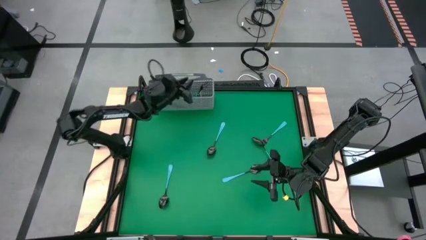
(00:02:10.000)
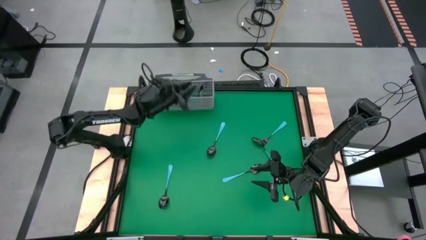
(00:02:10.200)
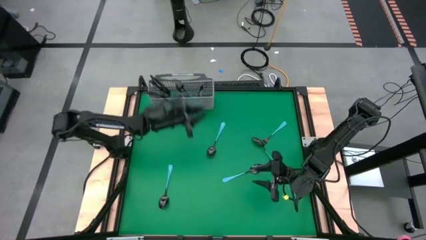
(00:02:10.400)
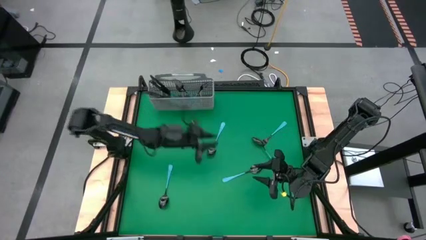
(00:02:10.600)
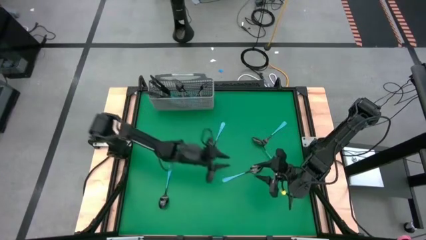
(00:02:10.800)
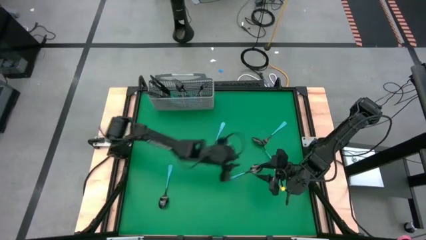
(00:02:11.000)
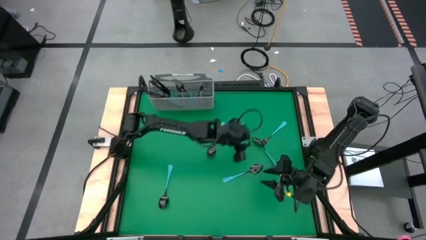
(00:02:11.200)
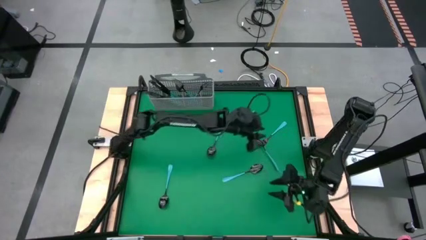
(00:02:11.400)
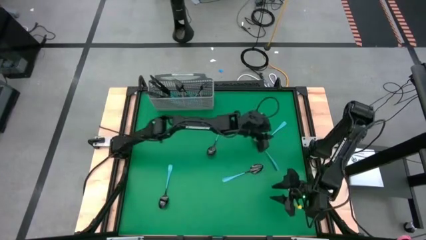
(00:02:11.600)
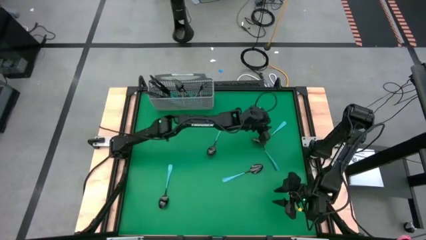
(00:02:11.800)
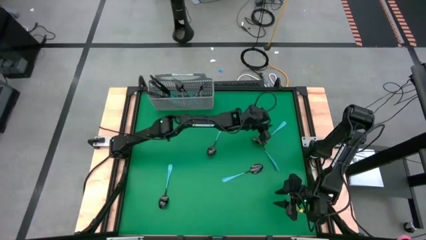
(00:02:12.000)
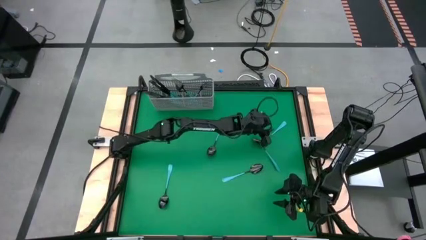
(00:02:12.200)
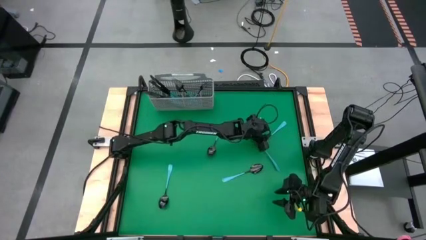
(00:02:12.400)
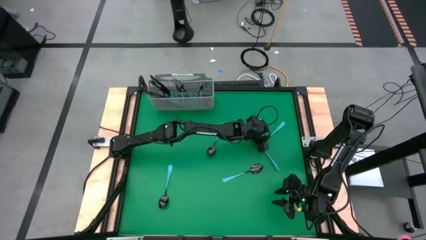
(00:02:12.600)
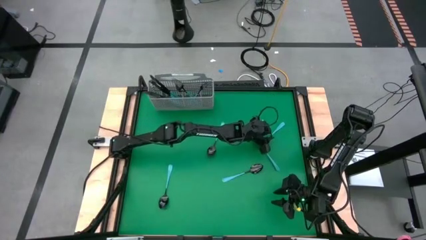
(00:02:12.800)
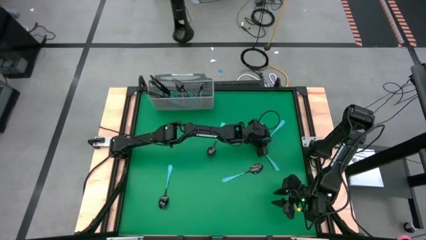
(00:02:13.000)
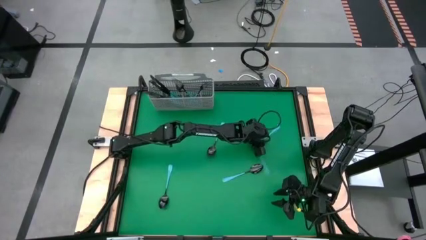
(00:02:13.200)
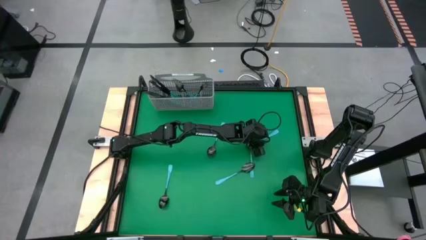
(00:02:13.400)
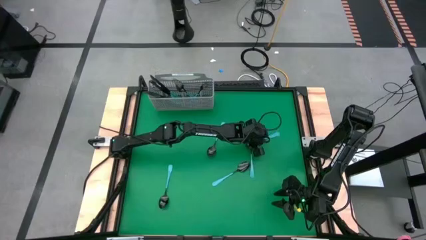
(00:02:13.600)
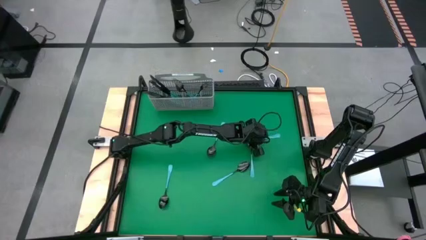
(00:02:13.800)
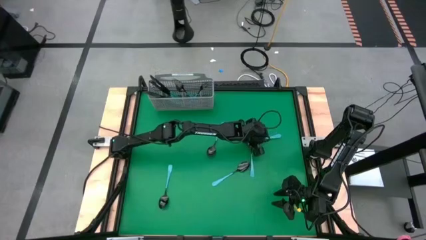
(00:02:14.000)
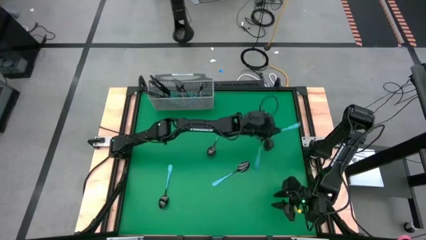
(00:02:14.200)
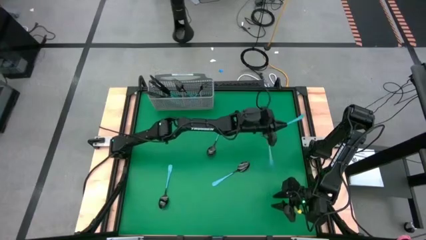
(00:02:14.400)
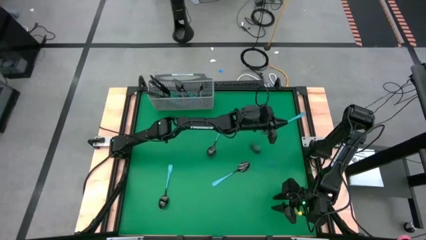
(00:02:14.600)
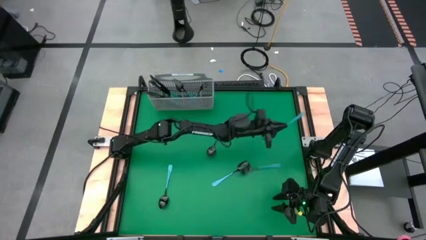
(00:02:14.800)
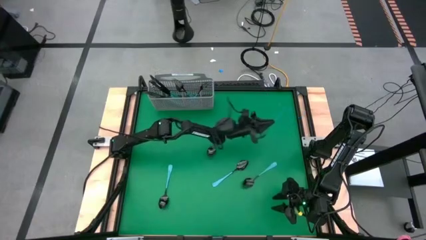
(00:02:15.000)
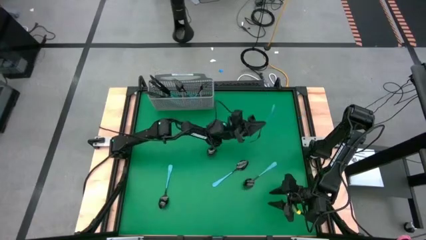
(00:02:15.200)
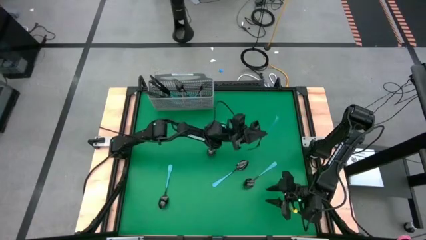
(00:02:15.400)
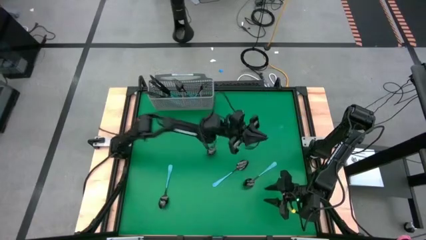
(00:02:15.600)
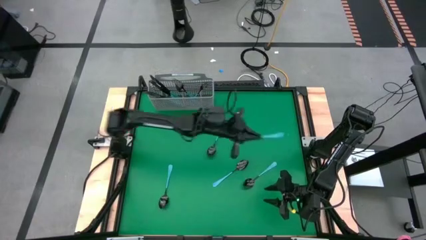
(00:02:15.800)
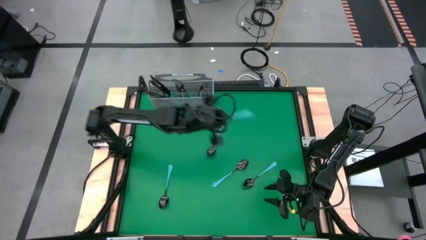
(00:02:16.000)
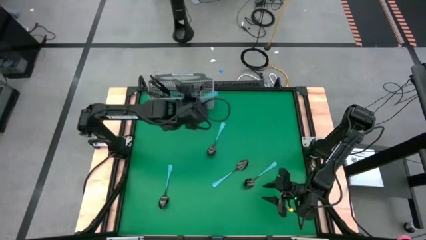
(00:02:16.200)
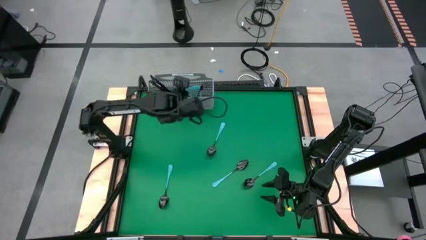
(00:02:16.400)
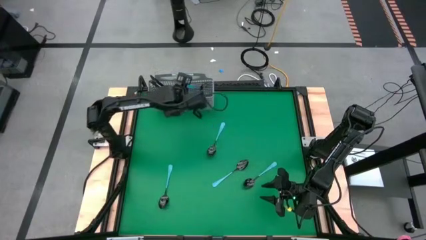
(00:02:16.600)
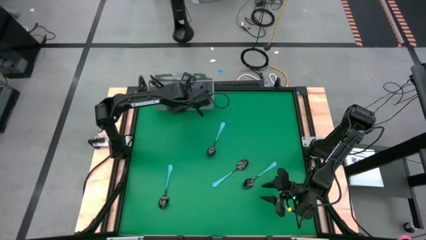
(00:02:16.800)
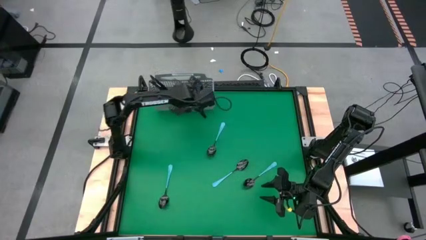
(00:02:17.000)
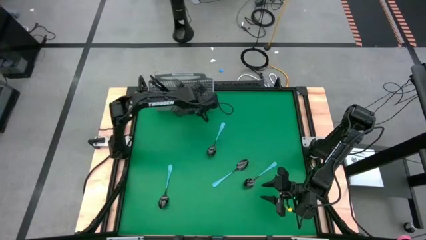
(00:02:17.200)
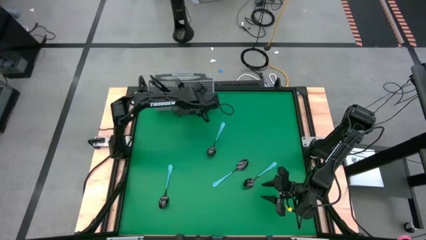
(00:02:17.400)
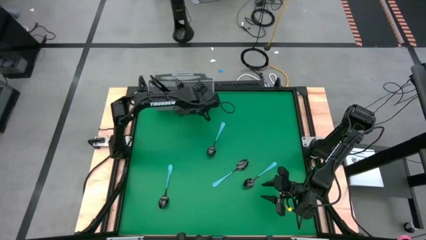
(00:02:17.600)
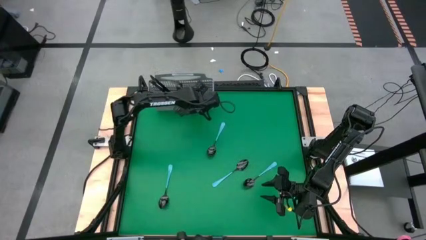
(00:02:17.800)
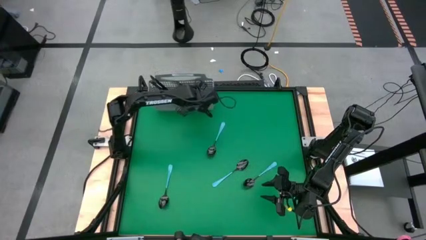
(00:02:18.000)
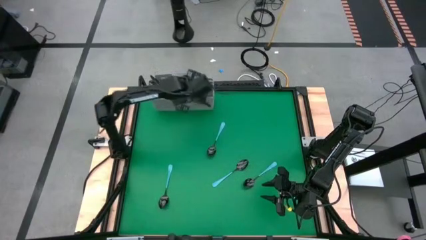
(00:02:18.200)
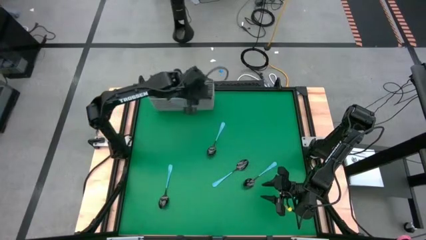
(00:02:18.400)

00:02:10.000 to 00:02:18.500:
Task: Sort silverware
Put the fork into the silverware rack

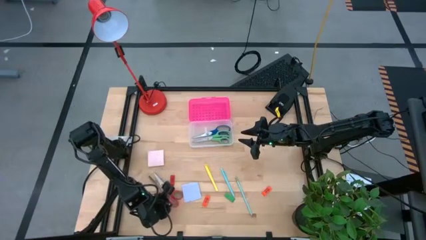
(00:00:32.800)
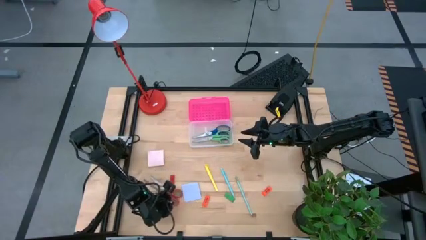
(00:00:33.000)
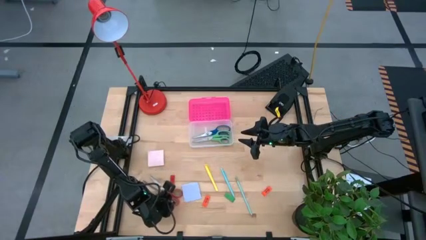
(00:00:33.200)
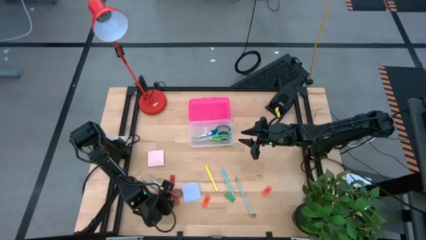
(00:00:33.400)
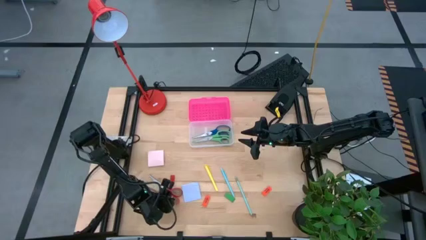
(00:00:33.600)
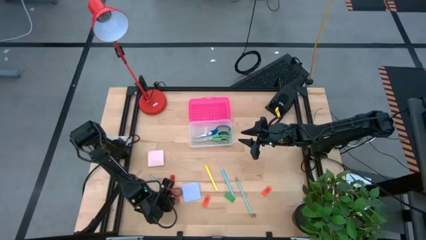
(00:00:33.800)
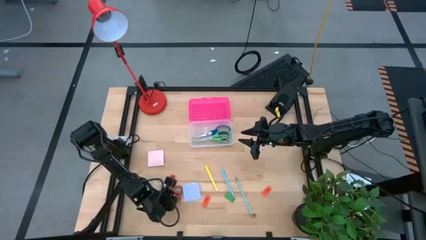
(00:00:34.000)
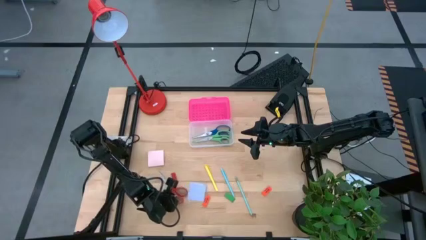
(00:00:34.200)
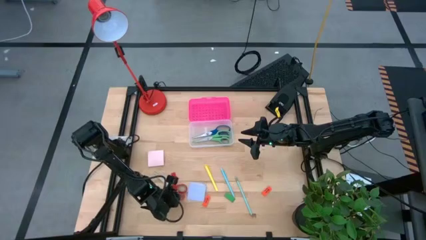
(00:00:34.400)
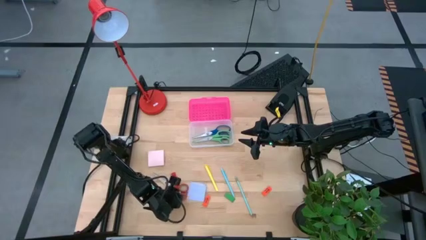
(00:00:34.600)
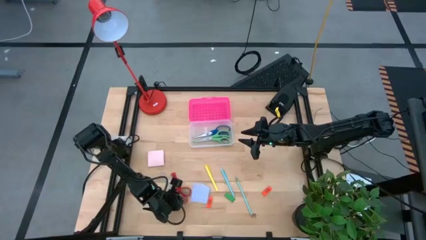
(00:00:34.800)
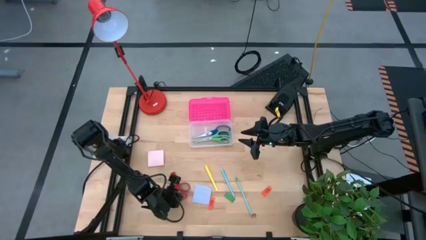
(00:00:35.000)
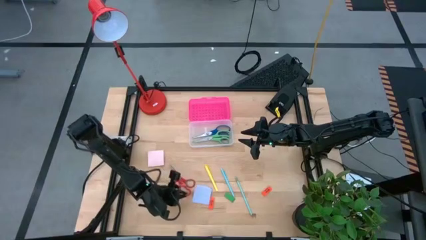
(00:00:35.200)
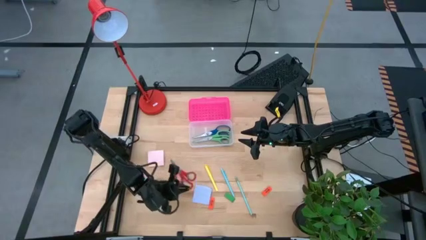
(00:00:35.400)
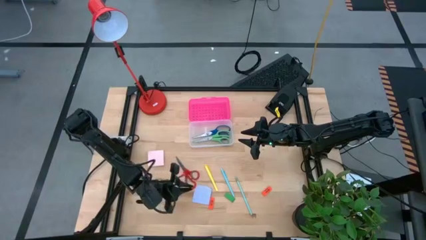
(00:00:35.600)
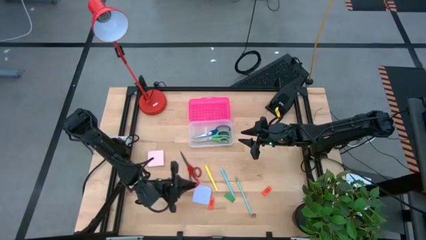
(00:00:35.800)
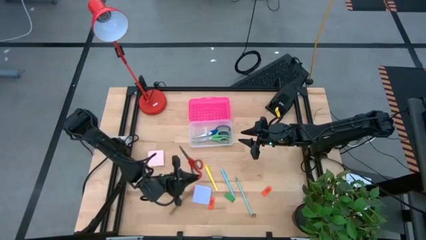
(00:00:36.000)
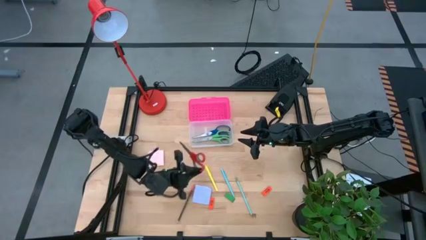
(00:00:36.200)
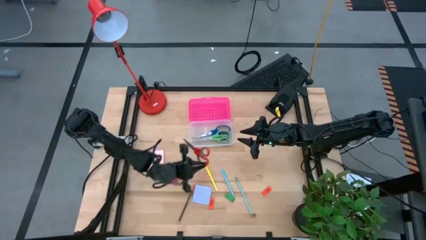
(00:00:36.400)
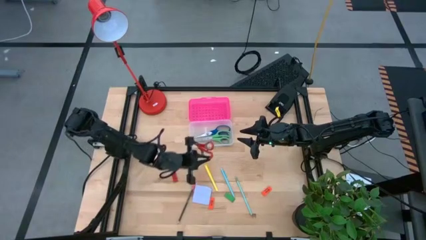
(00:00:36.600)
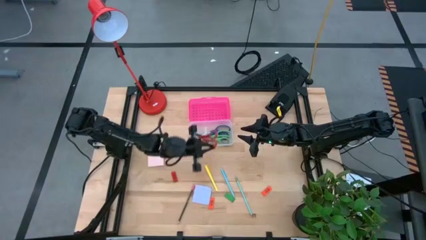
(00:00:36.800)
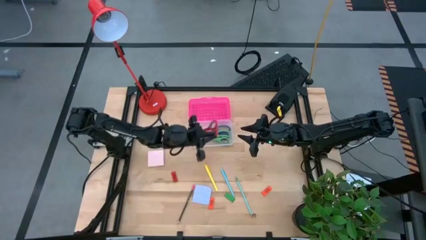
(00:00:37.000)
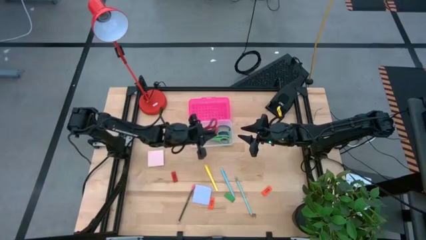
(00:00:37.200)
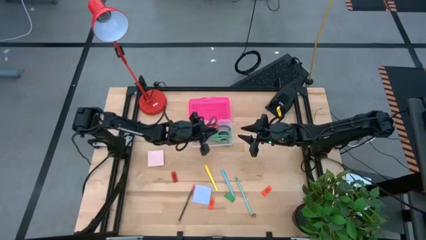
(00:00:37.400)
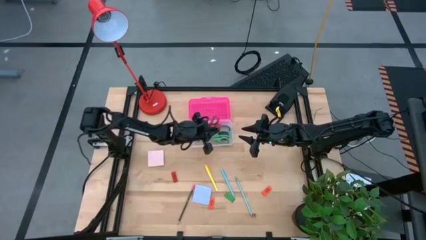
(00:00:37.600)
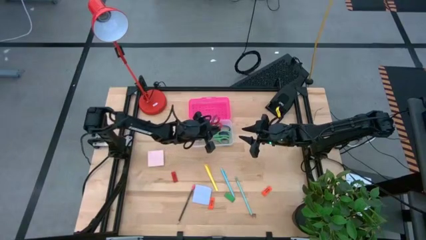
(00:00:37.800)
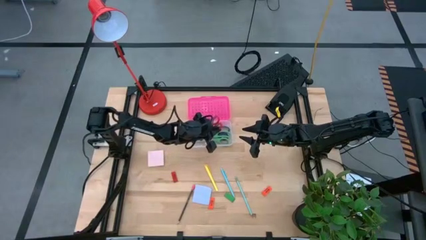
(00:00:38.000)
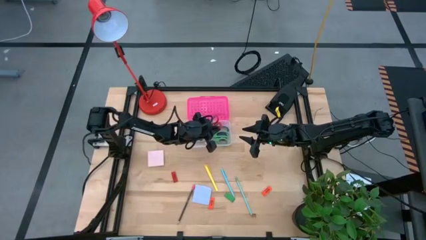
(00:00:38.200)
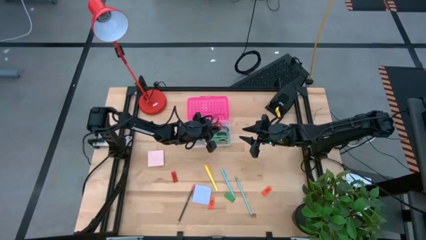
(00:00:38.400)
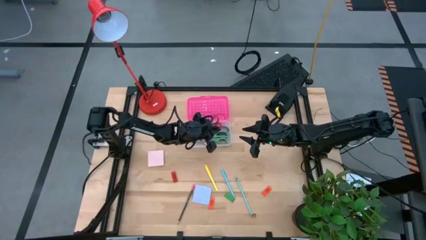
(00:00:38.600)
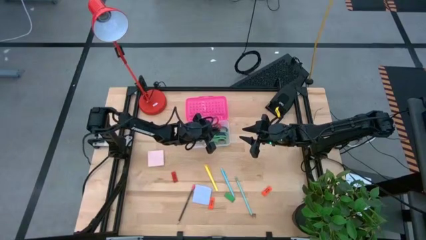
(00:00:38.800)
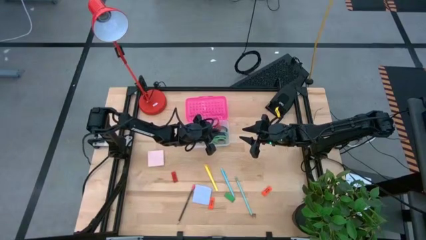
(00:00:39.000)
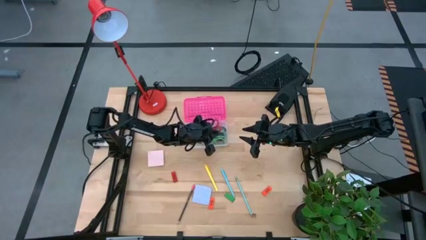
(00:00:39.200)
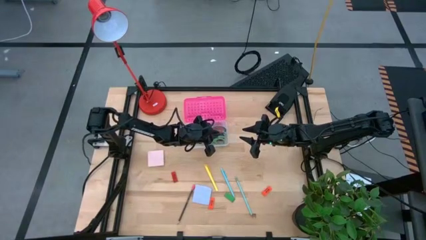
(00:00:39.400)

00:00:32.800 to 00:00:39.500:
Task: Pack school essentials
Put the red scissors into the pink supply box
